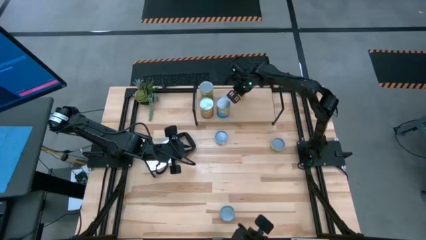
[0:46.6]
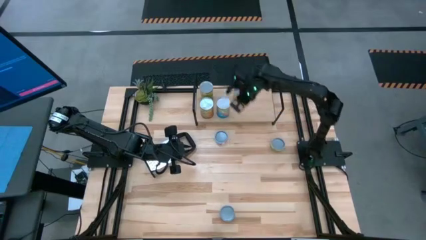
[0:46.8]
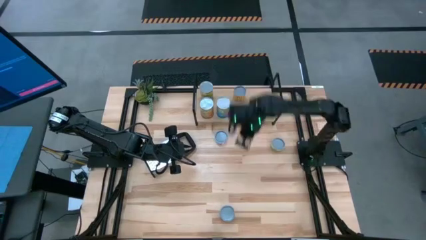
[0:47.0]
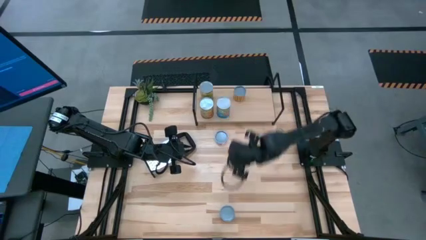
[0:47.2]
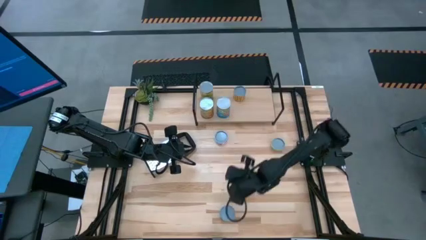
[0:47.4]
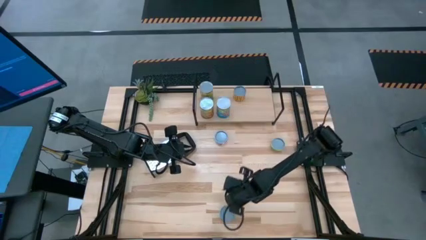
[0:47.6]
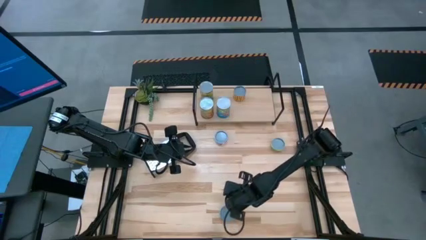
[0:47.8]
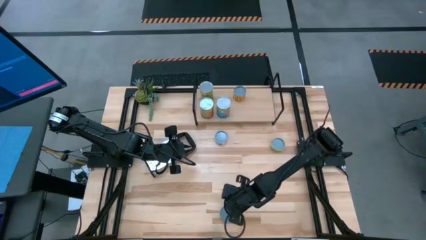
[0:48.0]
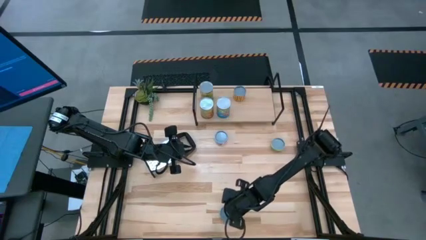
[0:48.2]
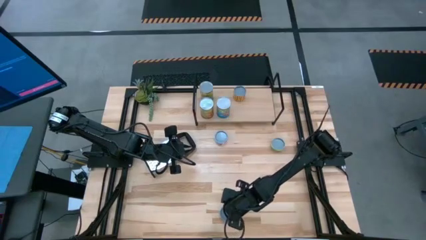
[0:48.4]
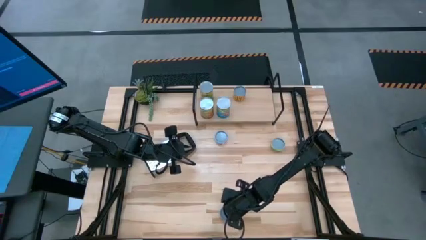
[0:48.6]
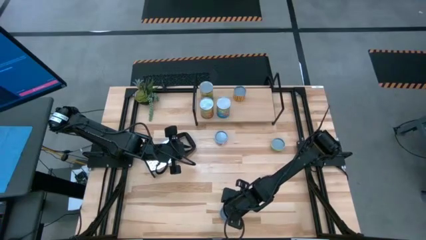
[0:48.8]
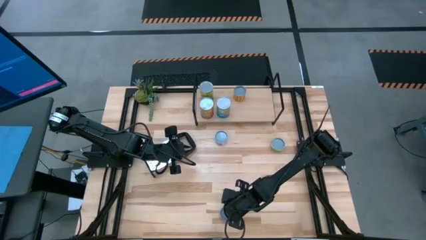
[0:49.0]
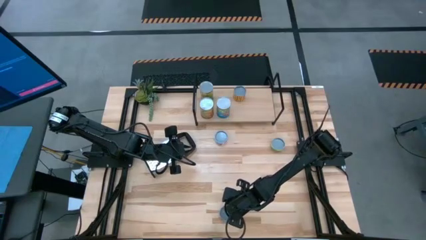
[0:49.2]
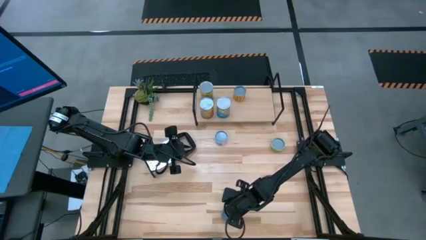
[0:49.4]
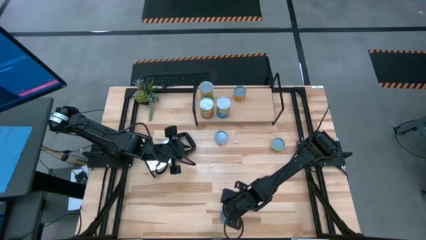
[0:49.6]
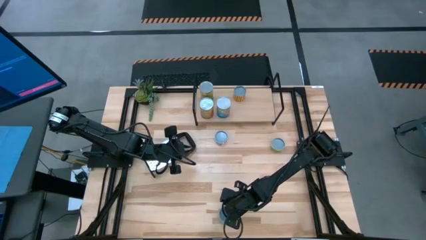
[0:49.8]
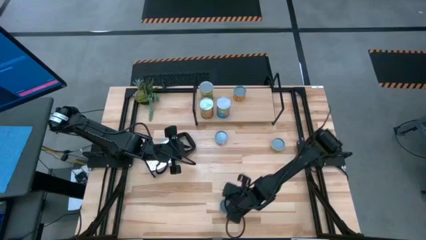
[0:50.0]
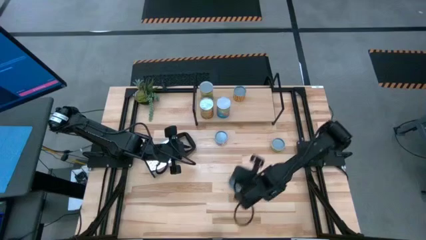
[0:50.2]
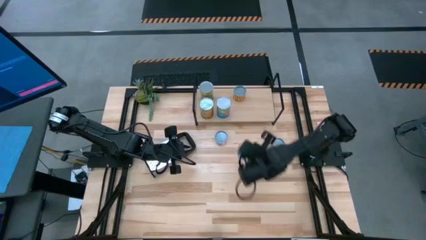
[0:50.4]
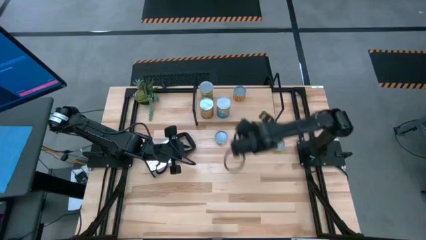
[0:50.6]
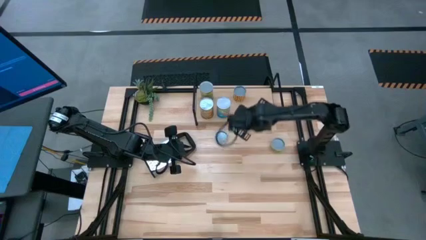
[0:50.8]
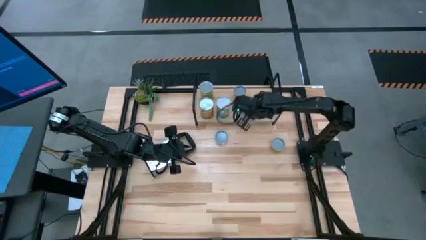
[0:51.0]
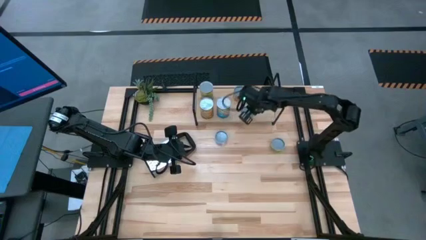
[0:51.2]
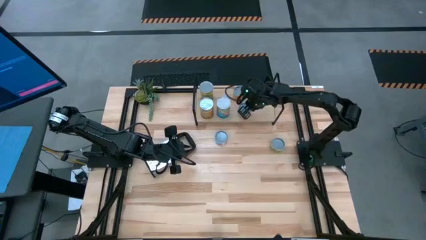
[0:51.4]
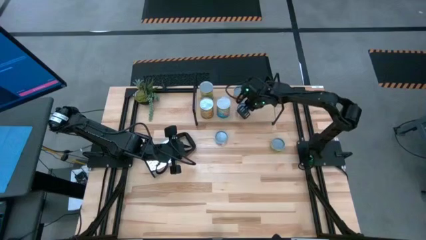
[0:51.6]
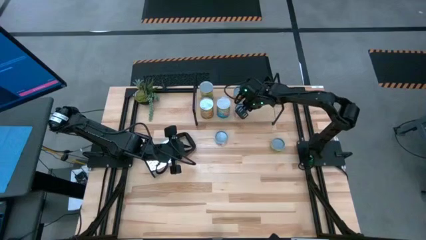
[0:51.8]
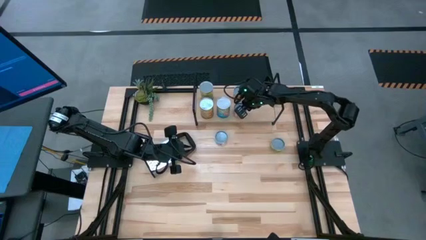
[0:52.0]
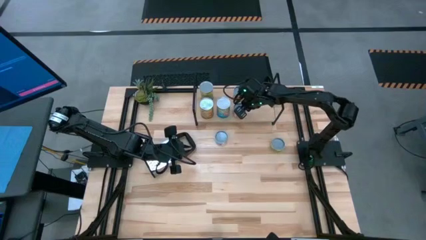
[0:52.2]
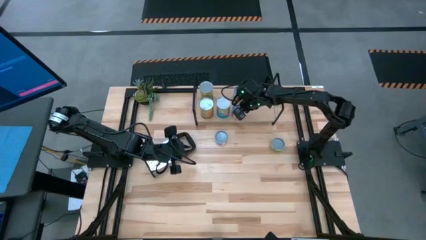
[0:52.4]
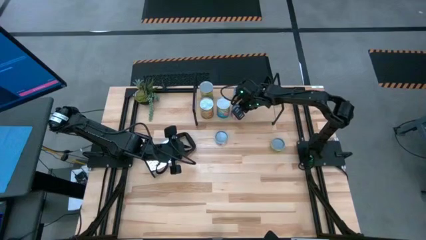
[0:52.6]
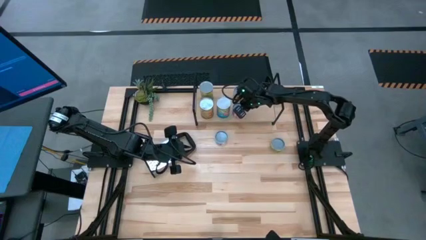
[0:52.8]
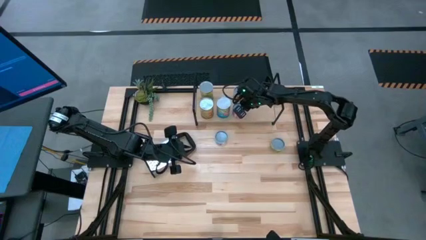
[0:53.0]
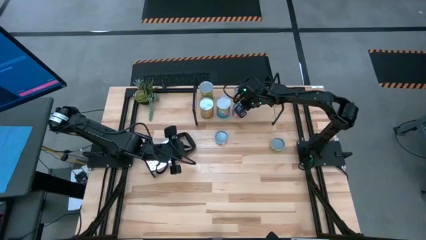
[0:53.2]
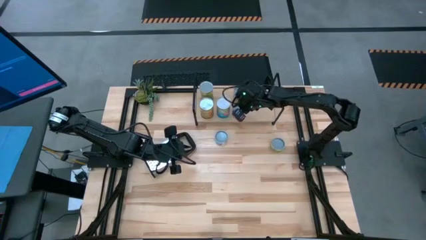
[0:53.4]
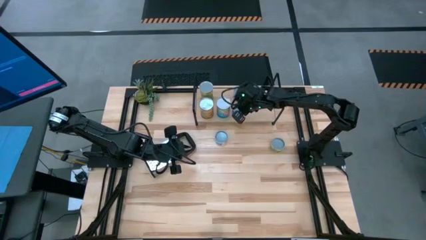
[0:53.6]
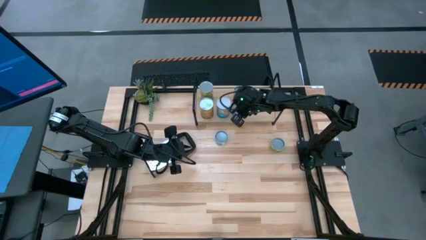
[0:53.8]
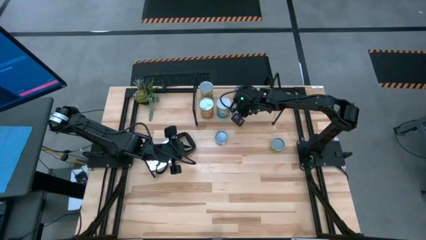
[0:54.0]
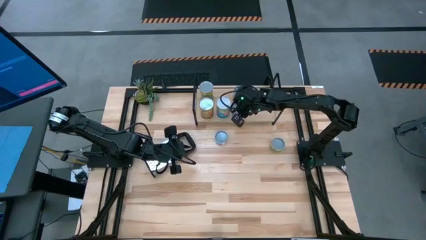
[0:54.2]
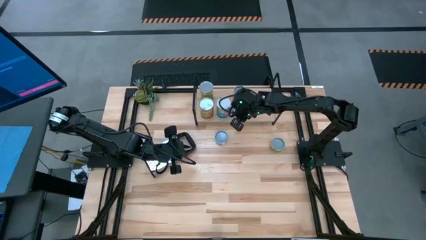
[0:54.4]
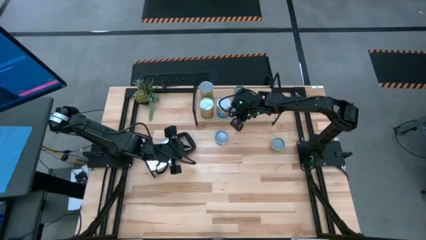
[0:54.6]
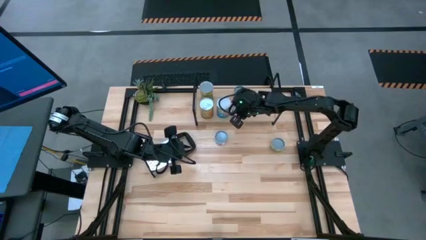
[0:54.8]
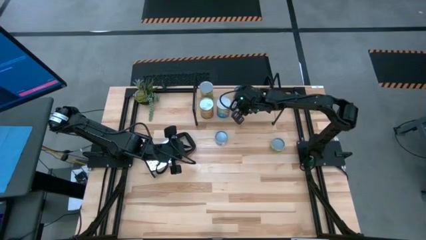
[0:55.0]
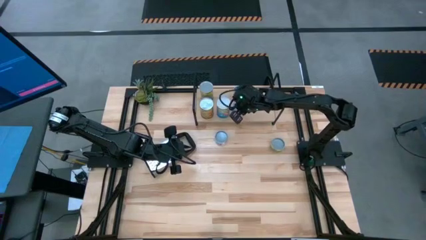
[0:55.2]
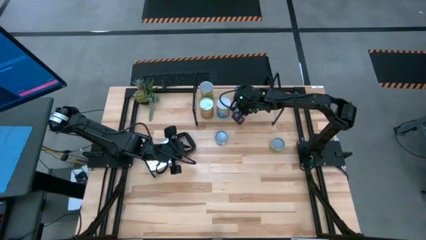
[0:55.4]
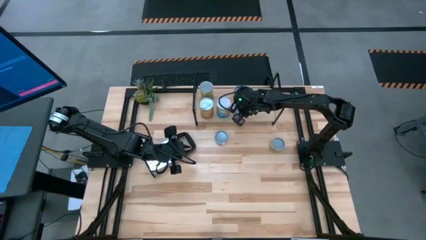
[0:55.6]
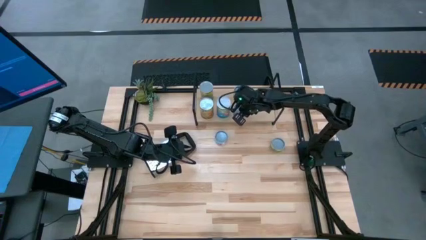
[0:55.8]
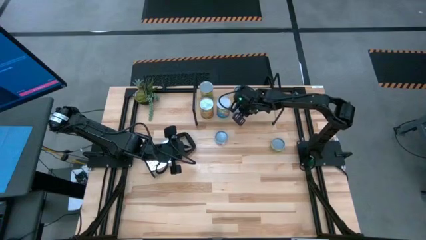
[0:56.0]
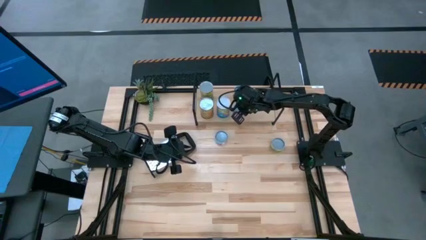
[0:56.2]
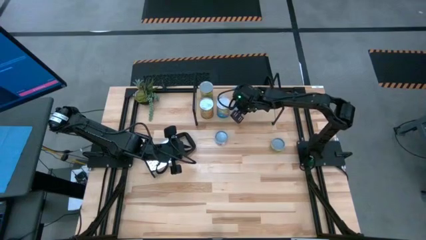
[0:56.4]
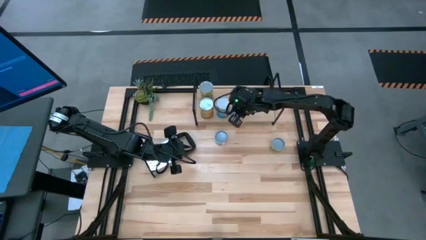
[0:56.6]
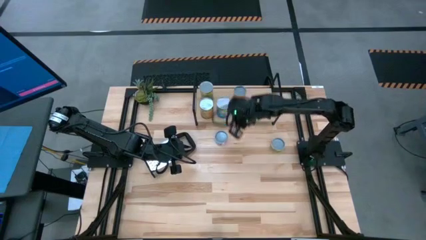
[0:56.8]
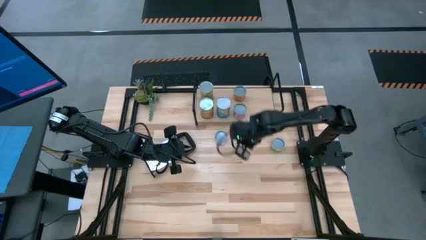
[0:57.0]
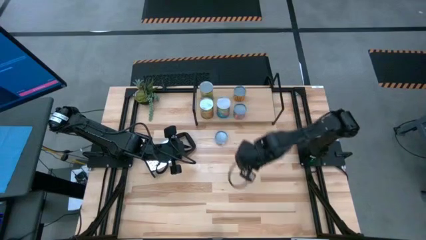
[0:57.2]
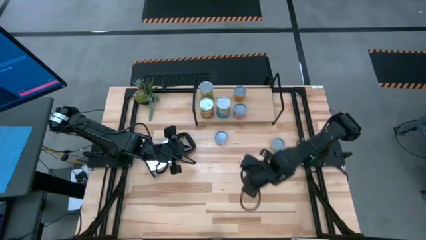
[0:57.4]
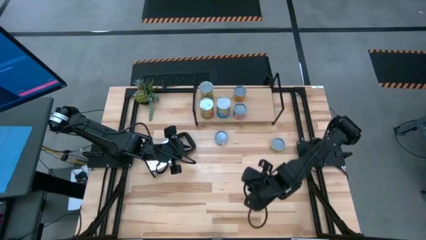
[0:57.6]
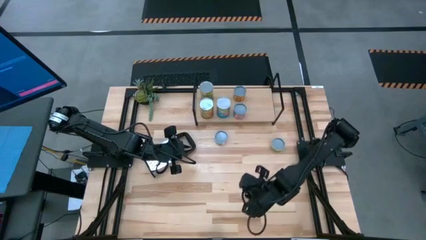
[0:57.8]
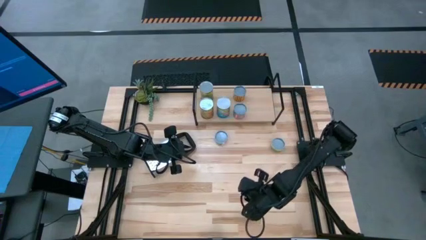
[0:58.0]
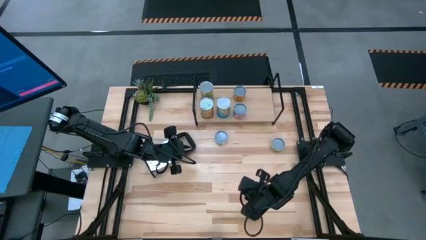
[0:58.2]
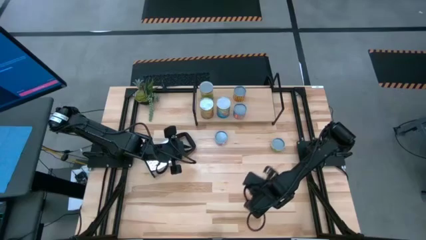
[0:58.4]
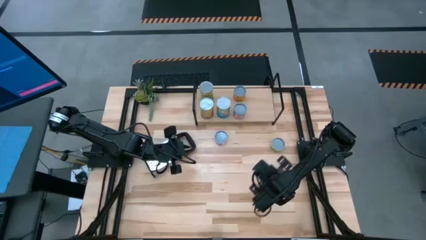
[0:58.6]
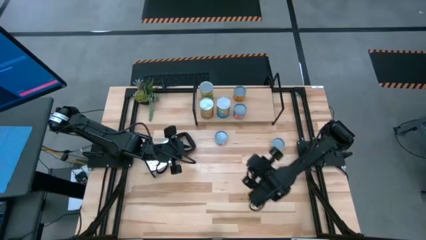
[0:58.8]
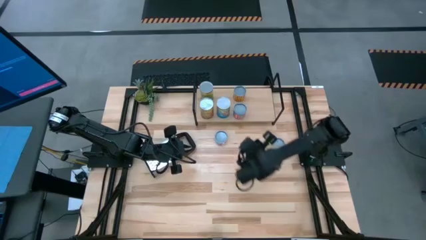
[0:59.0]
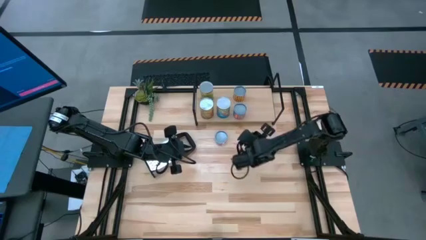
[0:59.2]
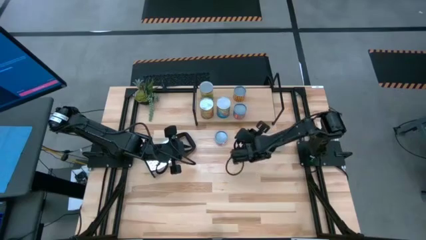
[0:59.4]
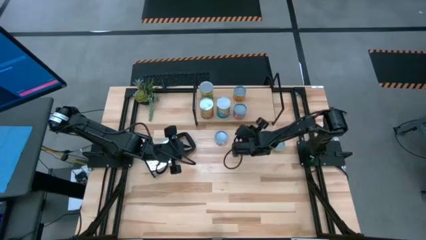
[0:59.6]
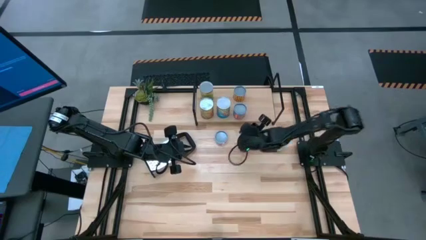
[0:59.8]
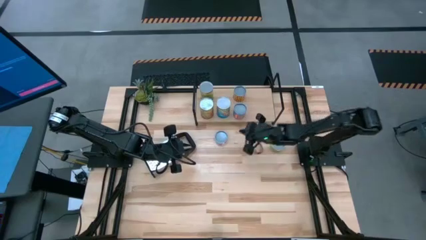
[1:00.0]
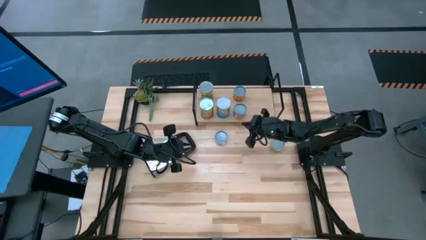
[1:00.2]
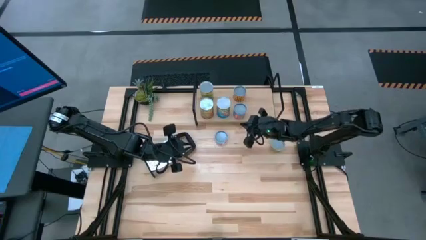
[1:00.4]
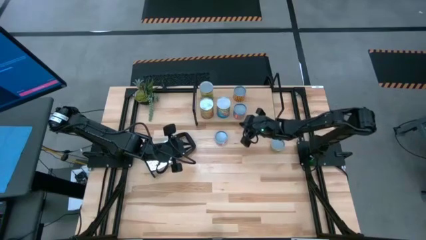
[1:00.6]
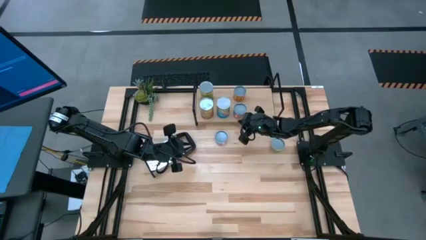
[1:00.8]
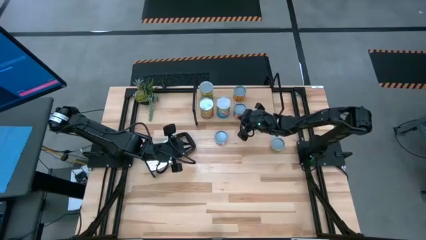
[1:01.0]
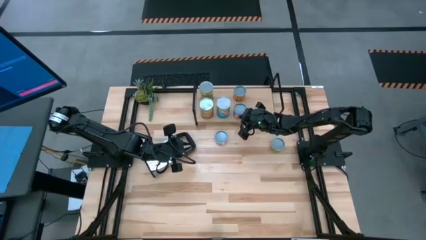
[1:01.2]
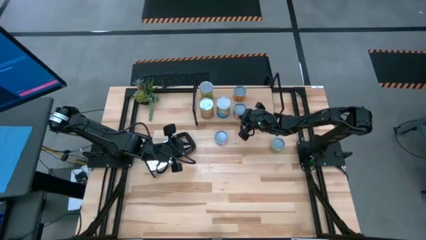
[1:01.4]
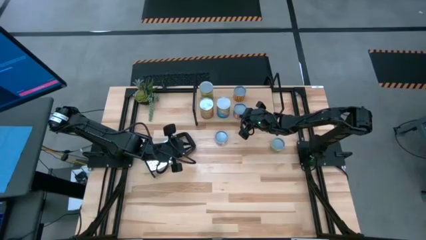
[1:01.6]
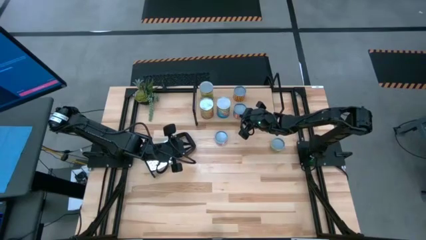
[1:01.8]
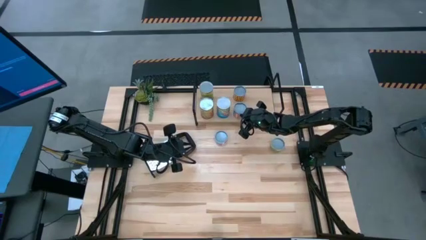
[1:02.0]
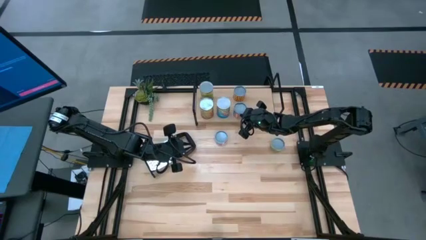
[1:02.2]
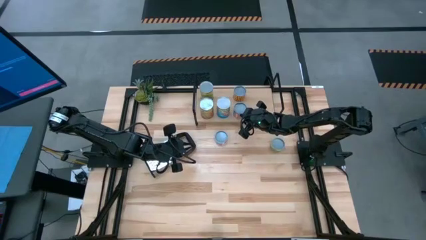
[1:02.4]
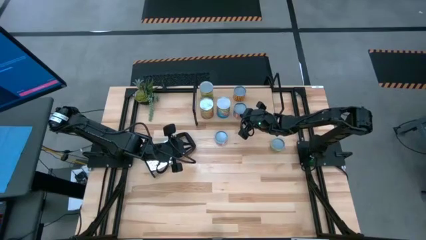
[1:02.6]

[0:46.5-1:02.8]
Task: Pick and place cans onto a shelf
Put the canned corn on the shelf

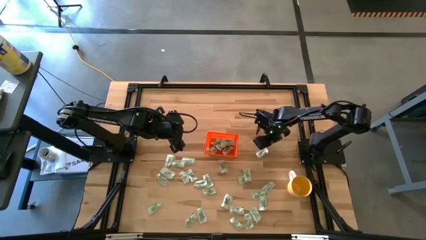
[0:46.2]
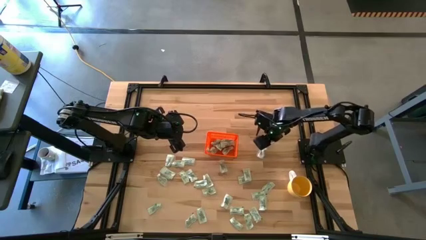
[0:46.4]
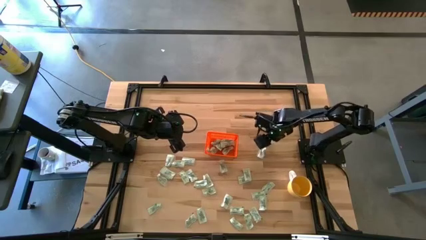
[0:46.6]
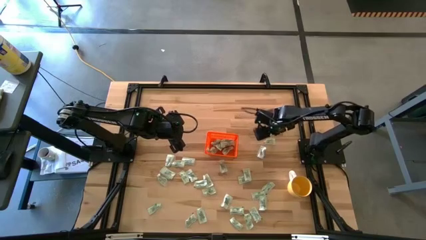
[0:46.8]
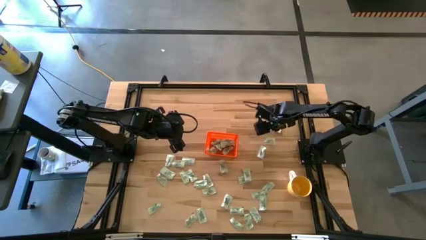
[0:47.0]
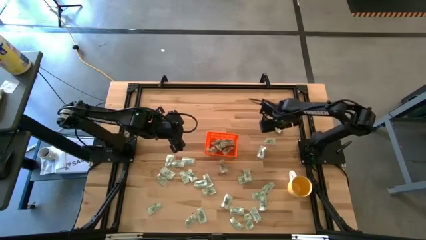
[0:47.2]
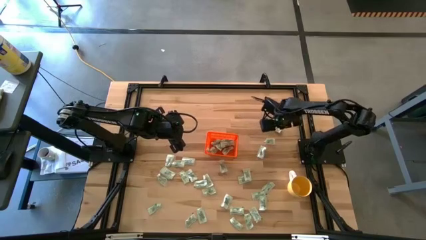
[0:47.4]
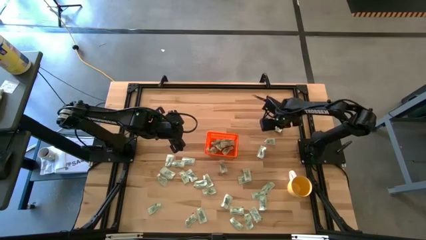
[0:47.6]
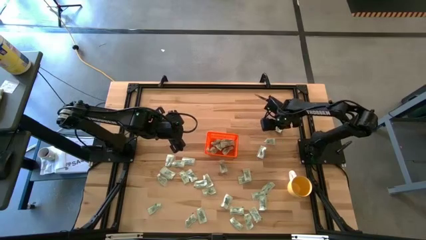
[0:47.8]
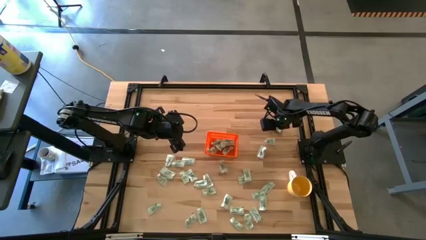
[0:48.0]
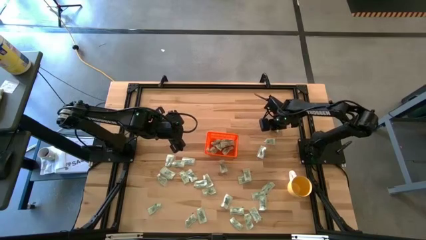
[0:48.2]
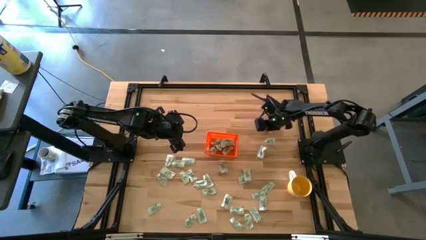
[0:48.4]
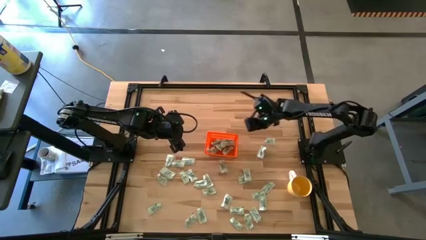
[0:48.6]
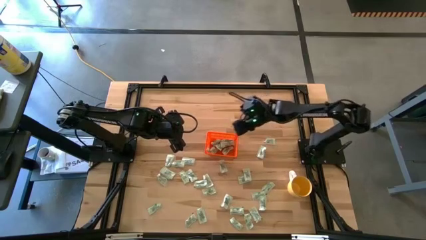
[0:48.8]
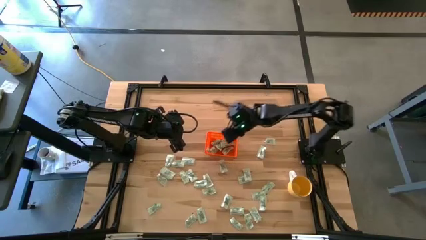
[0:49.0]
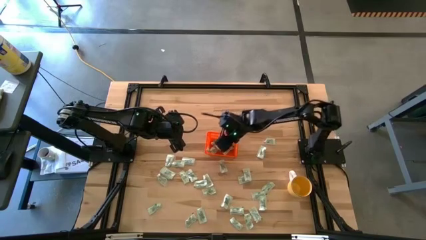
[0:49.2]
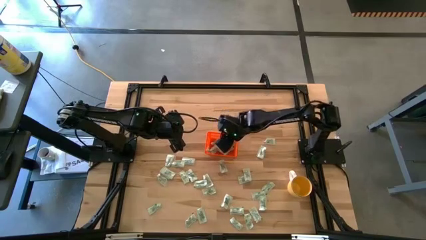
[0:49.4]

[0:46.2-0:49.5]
Task: Pick and place Stevia / Truvia into bins
Put the light green stevia packet into the orange bin
